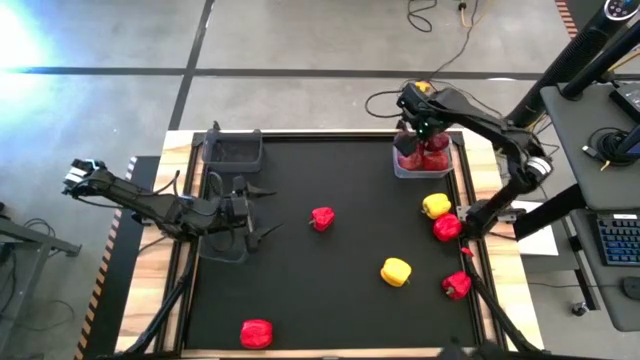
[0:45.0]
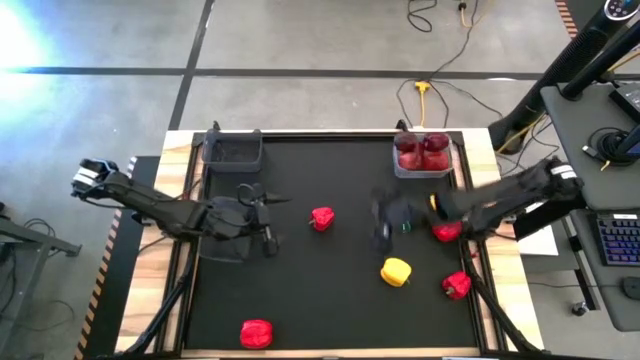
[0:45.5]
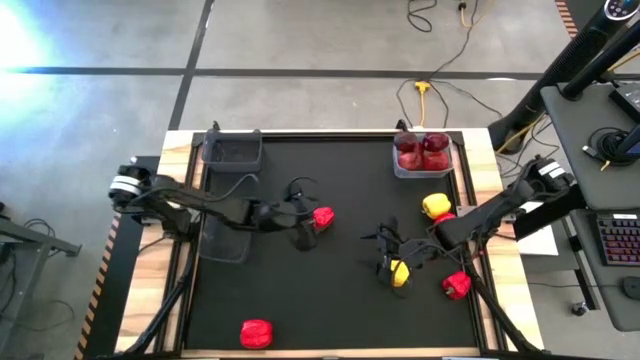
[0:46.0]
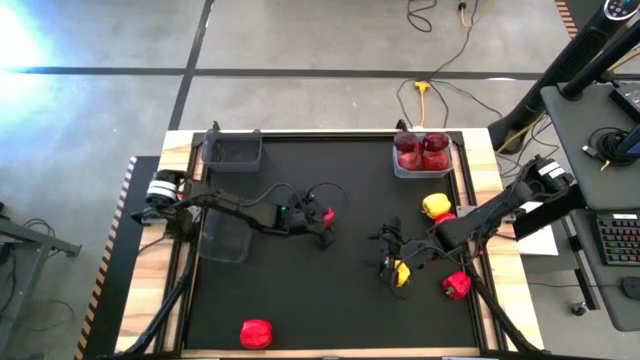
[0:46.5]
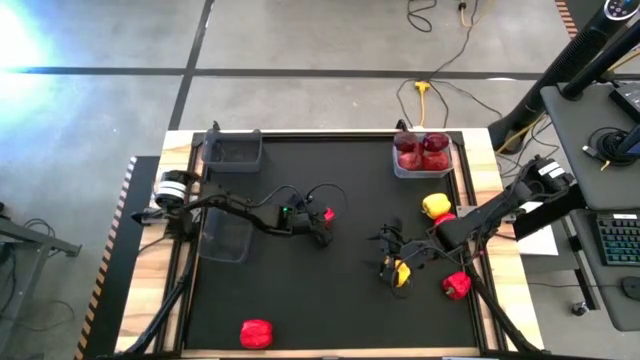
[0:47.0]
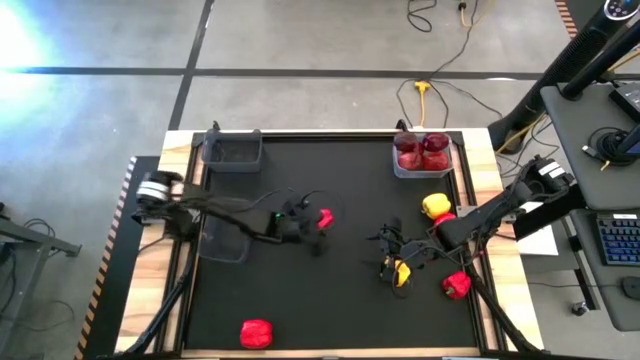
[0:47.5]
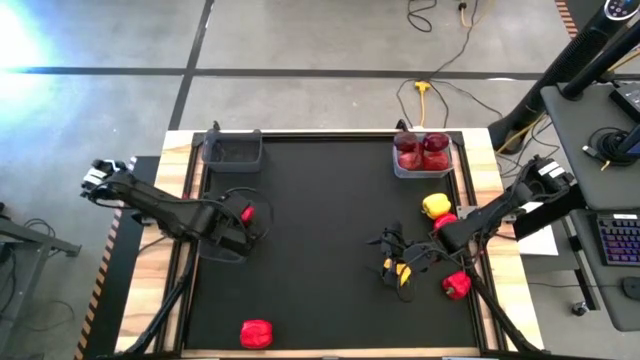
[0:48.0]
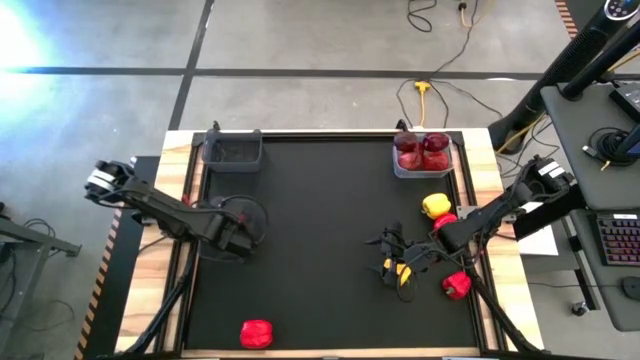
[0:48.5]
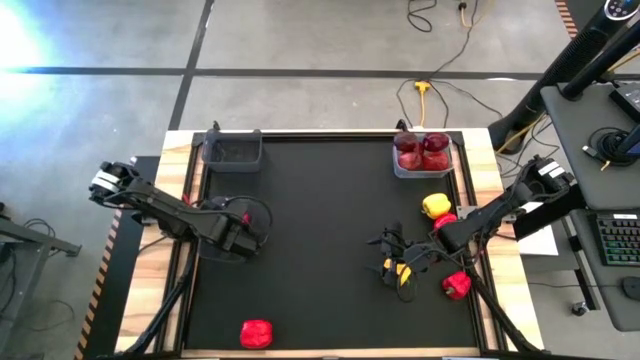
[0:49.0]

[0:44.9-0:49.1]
Task: Sort produce into baskets
Put the red bell pepper into the bottom black bin

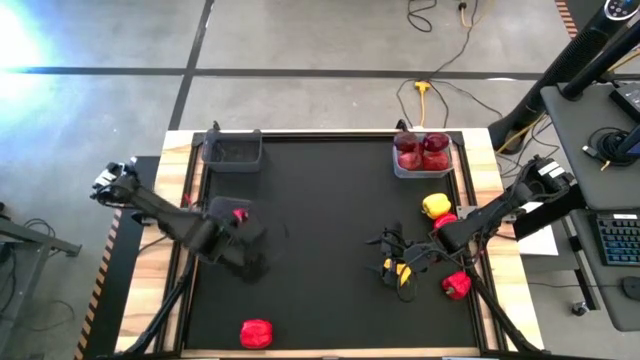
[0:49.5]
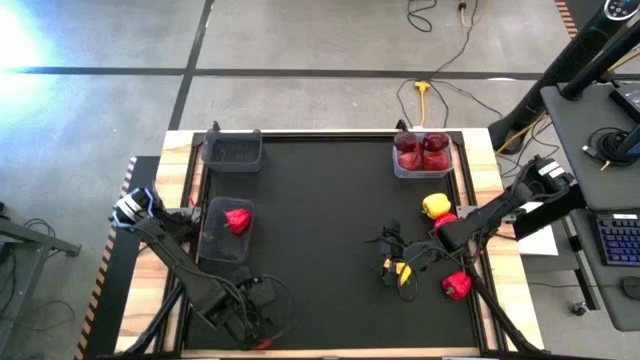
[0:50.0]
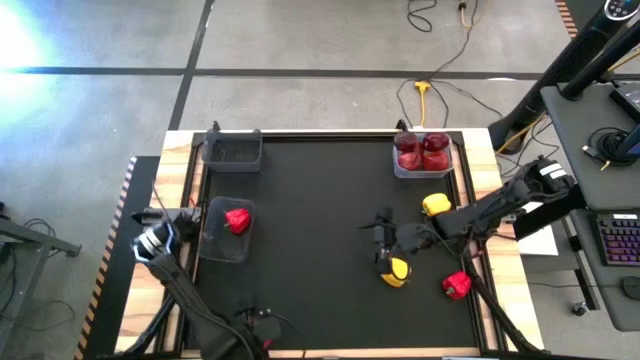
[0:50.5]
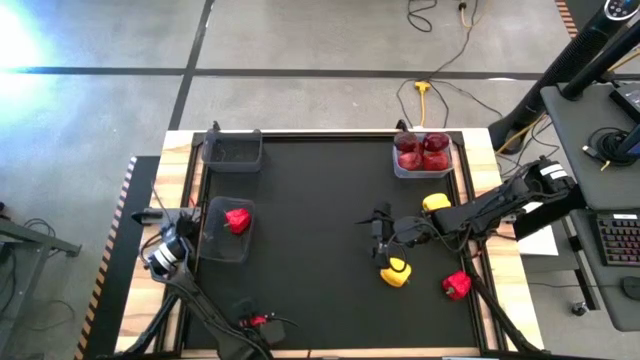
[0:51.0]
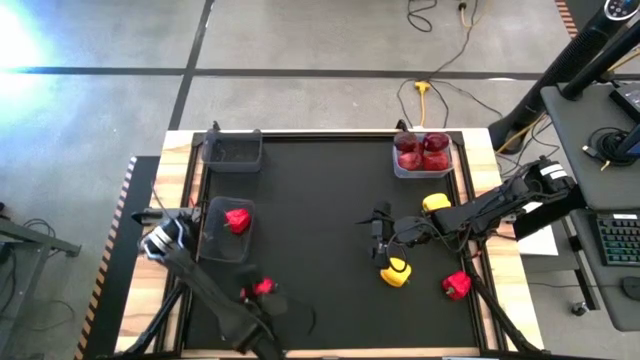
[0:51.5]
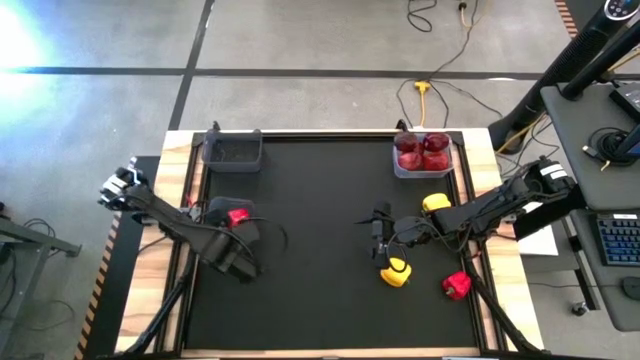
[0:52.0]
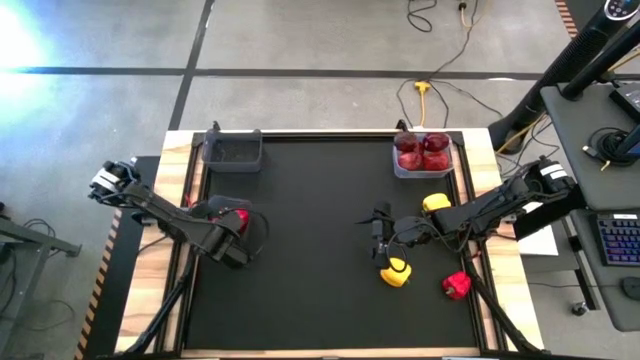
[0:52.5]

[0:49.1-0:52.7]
Put the bottom red bell pepper into the bottom black bin

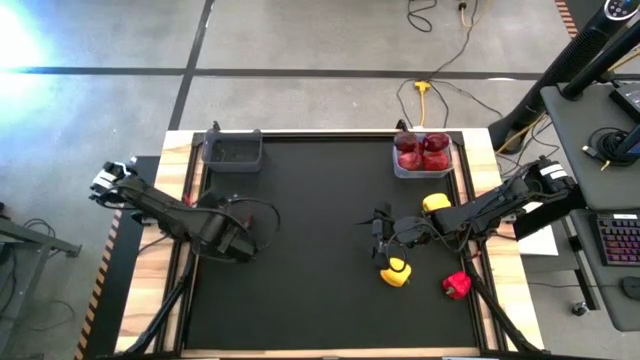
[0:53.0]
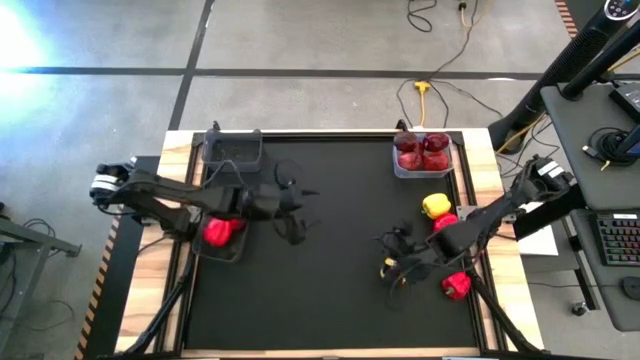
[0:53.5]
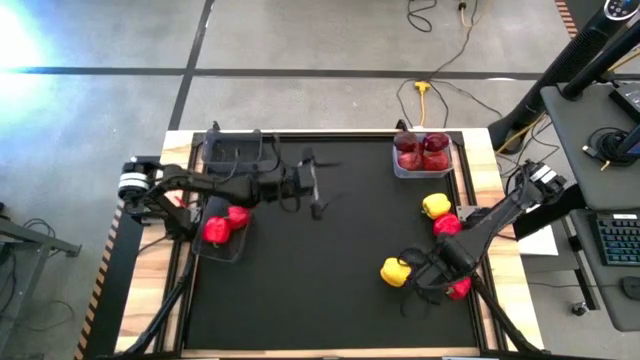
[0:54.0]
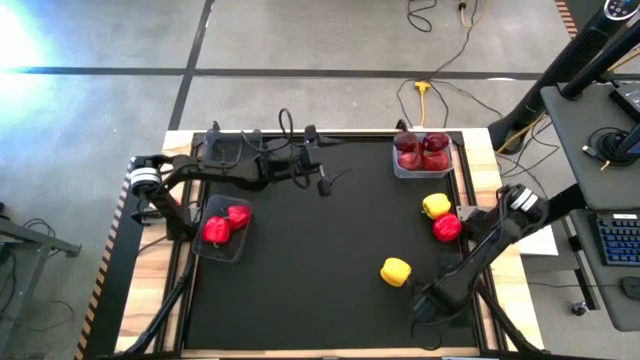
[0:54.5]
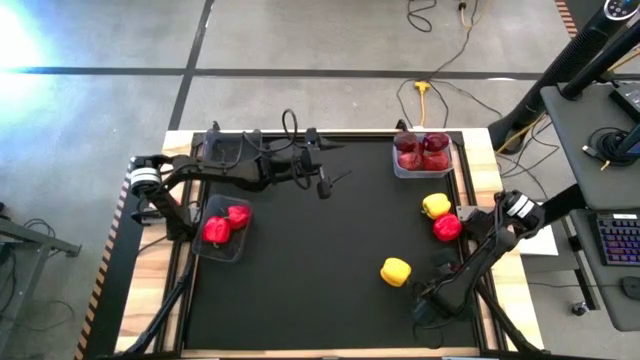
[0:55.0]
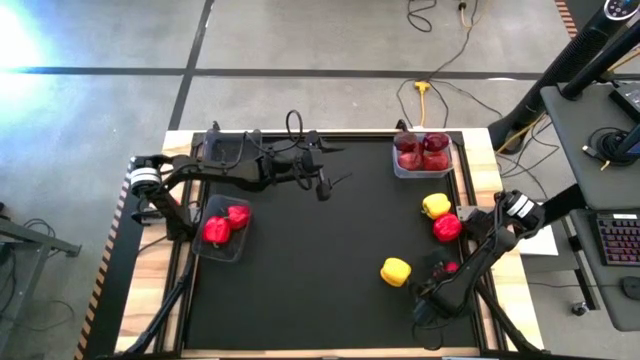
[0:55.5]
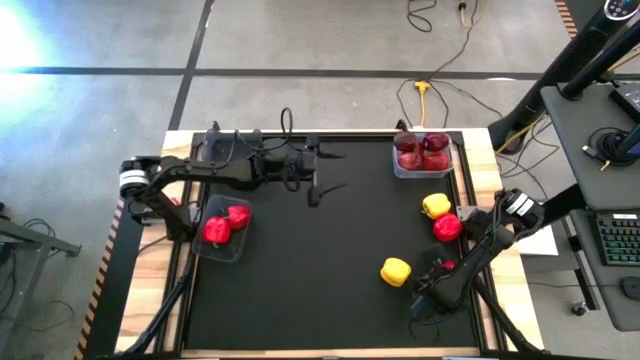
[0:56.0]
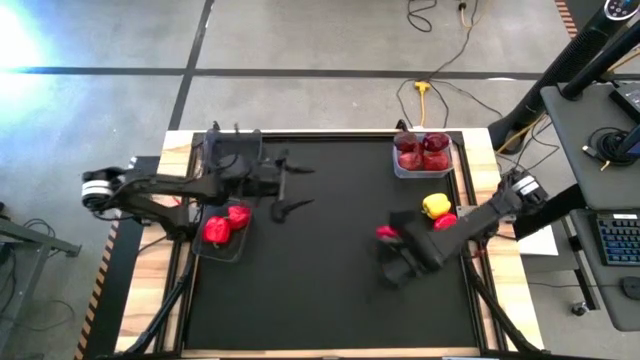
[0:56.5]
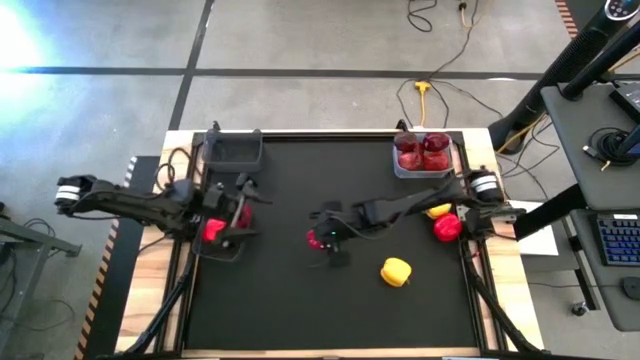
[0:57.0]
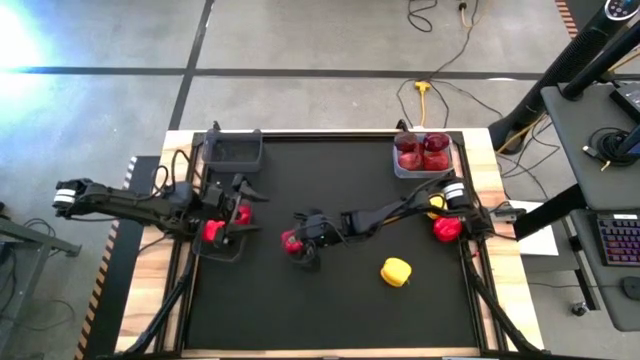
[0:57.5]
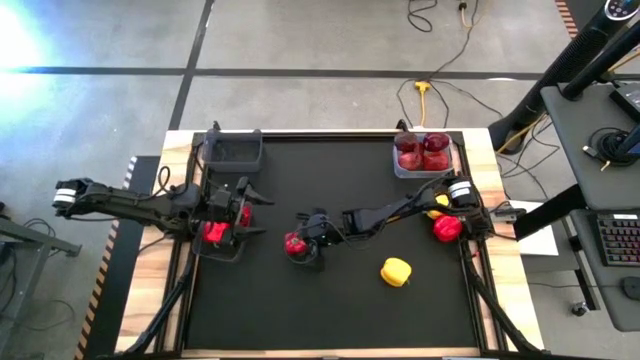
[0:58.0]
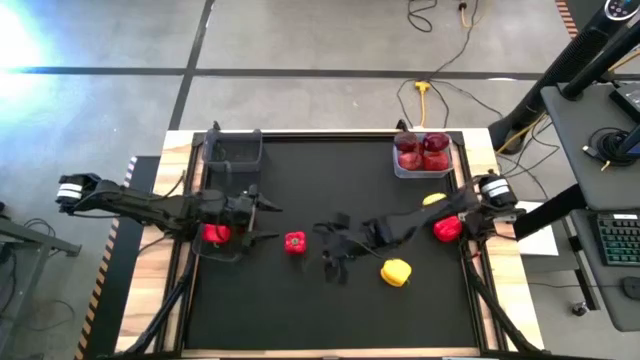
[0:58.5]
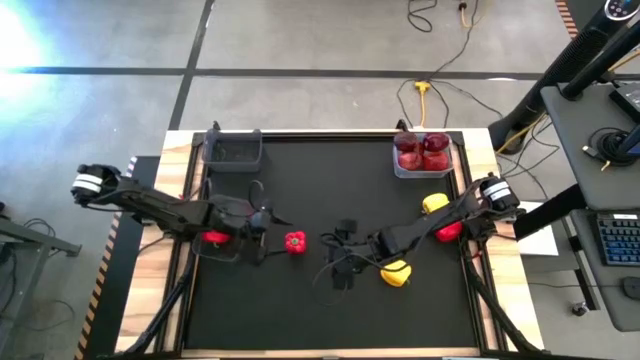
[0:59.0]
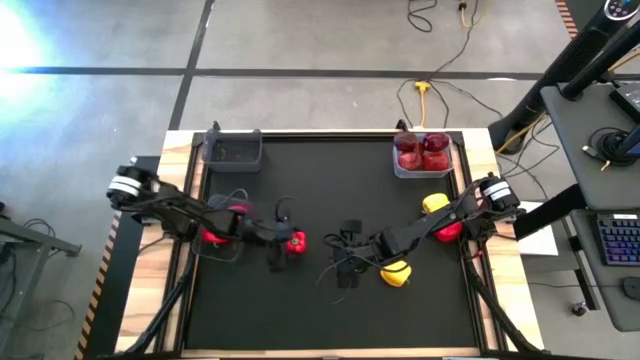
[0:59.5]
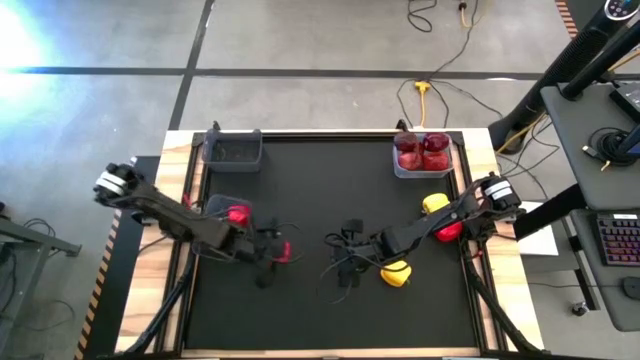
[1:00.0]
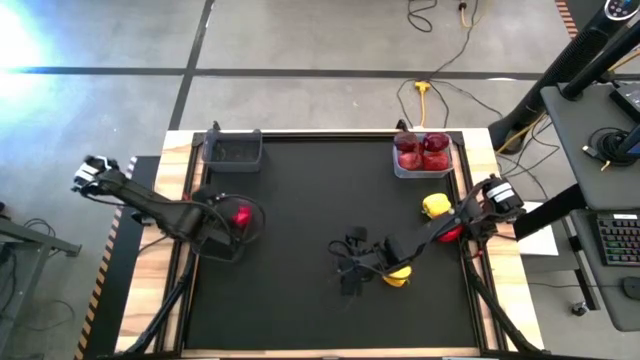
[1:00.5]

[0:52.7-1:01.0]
Put the bottom red bell pepper into the bottom black bin

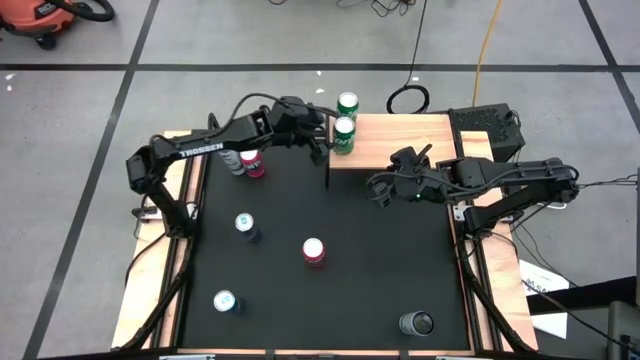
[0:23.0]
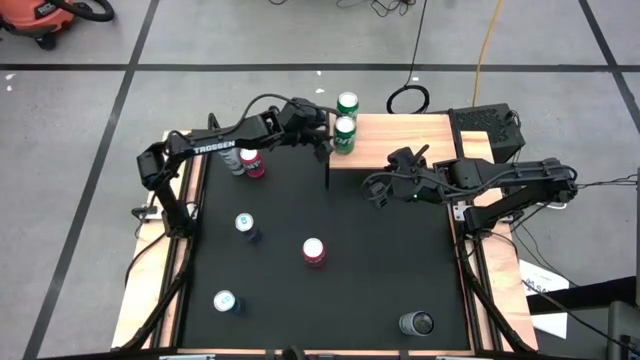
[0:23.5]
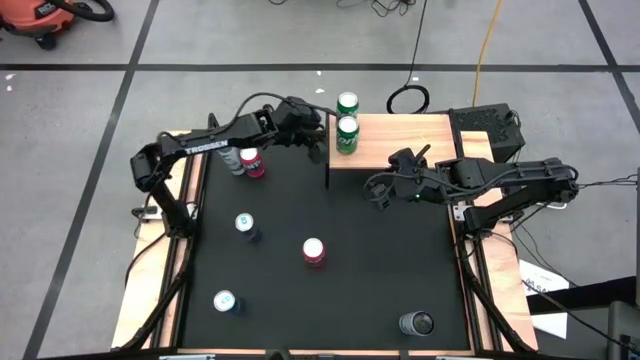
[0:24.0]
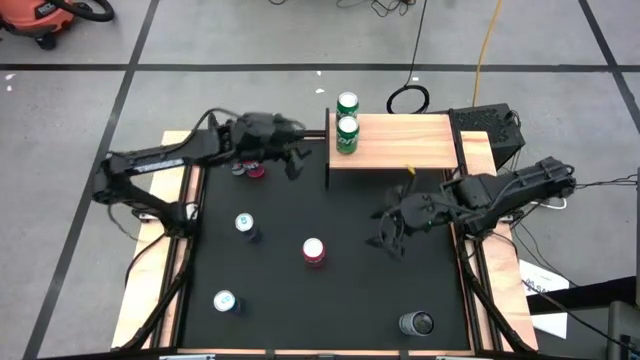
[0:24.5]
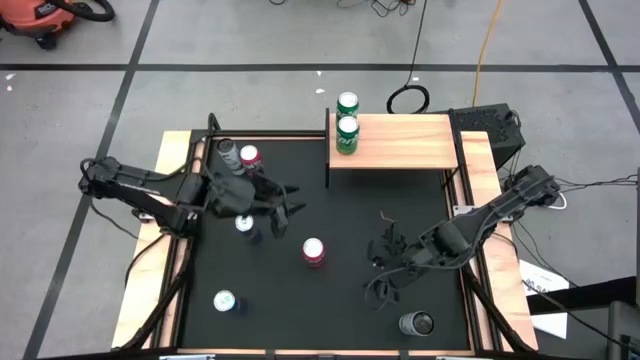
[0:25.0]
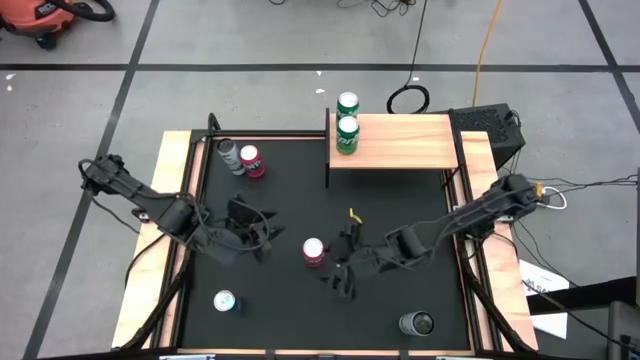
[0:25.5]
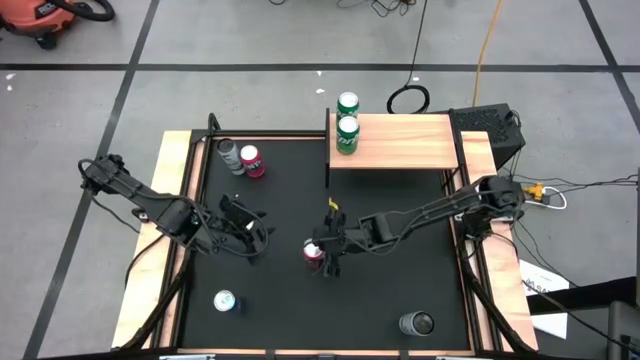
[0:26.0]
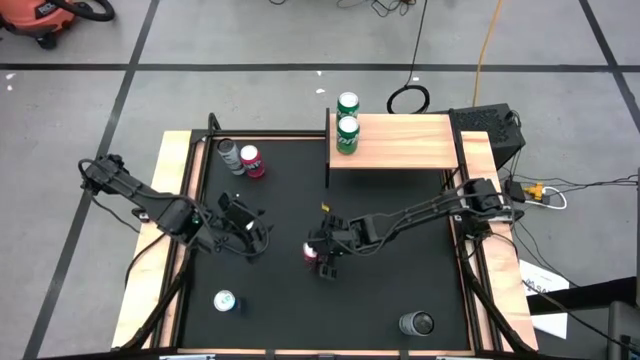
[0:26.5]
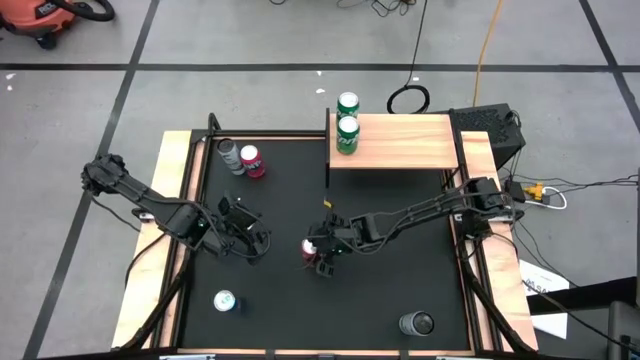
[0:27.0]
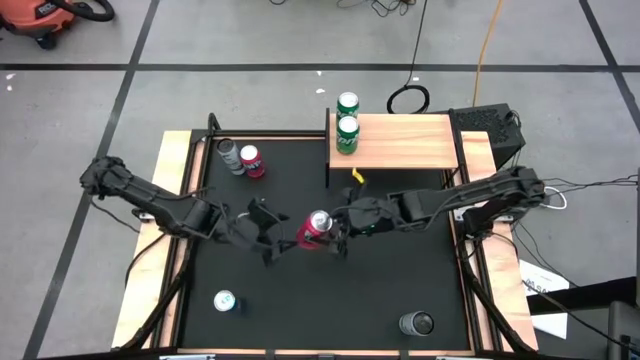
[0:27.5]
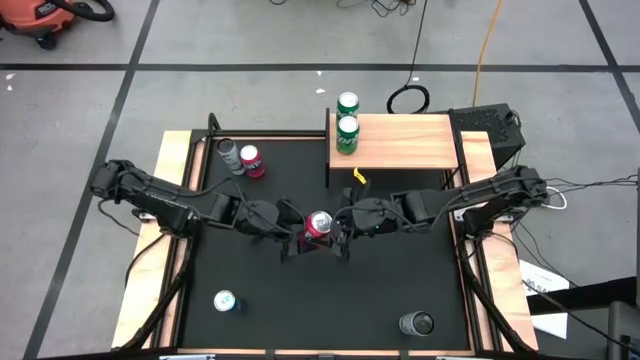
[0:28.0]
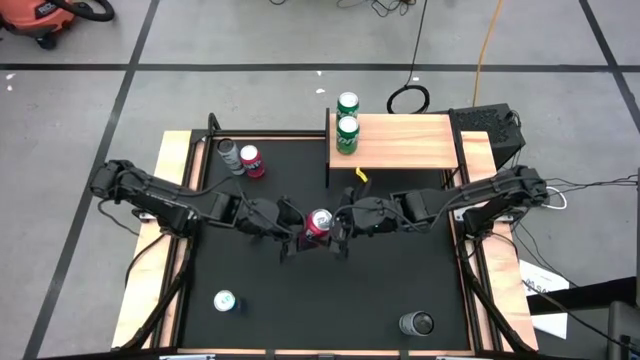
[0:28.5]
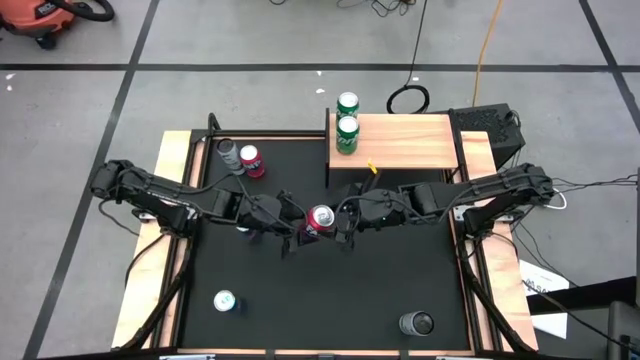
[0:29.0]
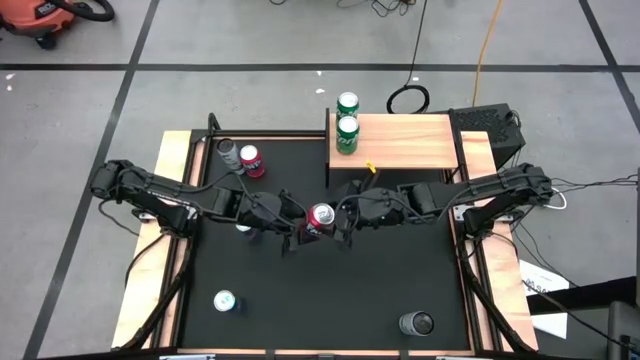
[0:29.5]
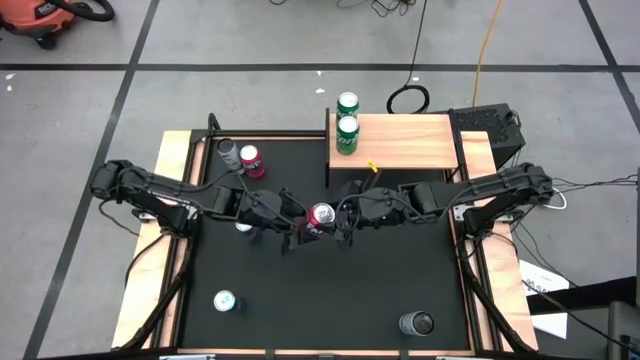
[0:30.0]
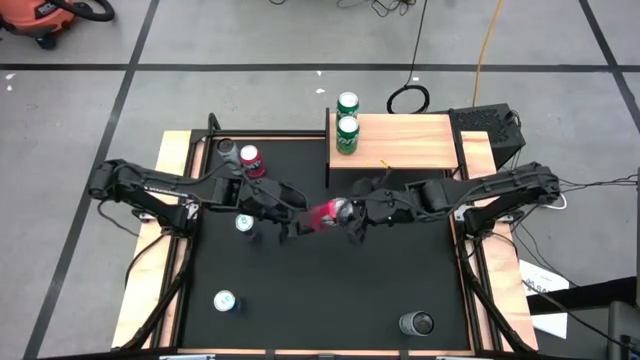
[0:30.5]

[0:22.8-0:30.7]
Task: Place canned beverage on shelf
Put the bottom orange soda can on the shelf
